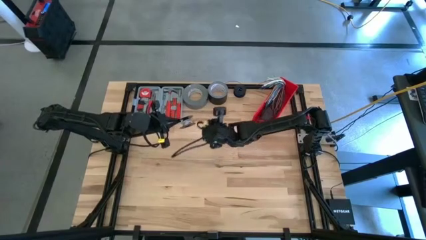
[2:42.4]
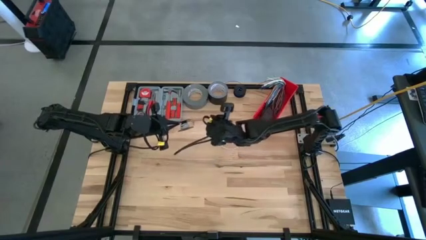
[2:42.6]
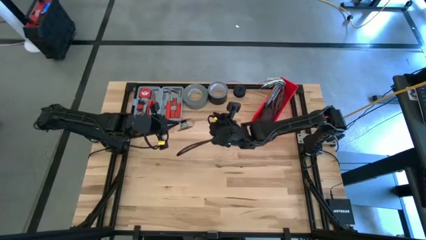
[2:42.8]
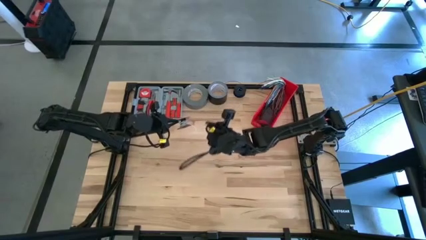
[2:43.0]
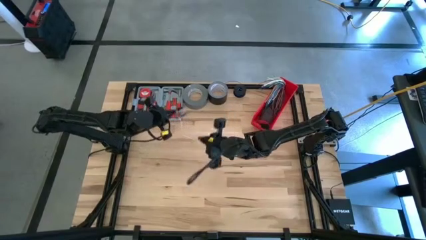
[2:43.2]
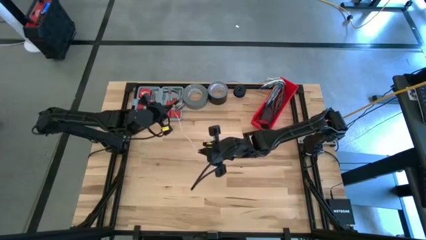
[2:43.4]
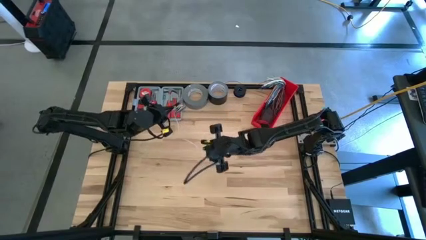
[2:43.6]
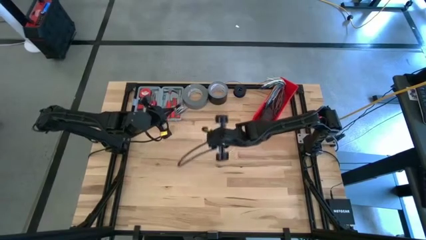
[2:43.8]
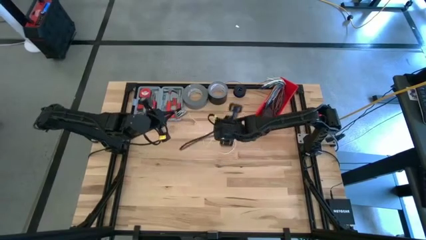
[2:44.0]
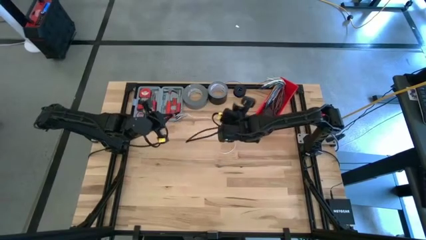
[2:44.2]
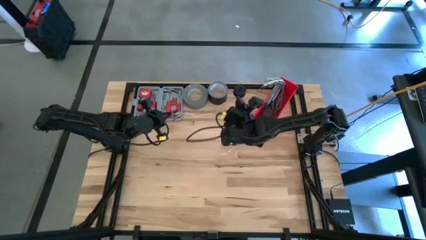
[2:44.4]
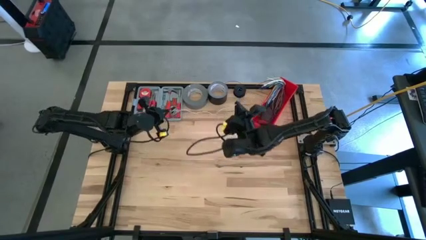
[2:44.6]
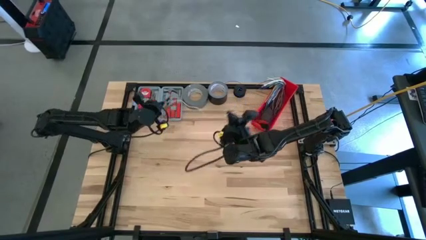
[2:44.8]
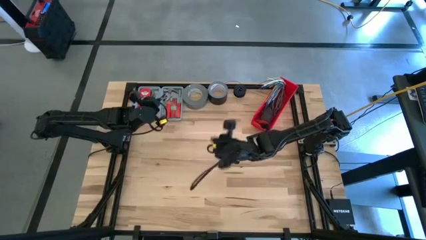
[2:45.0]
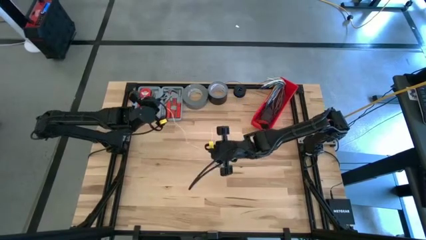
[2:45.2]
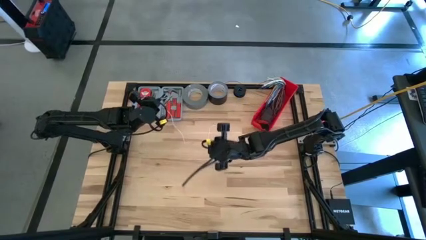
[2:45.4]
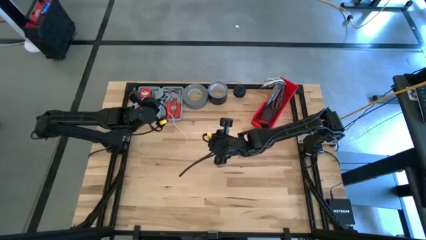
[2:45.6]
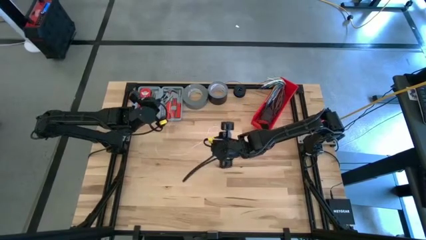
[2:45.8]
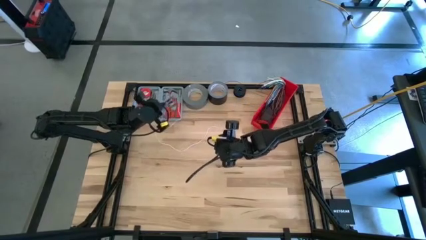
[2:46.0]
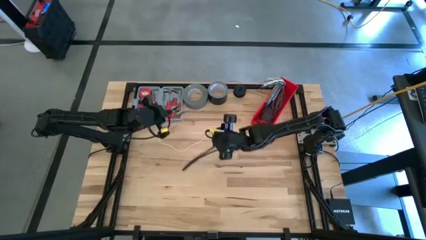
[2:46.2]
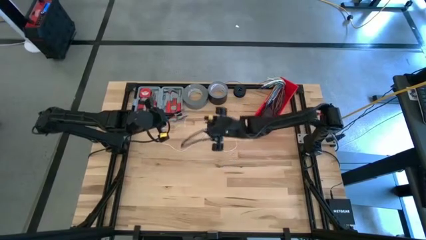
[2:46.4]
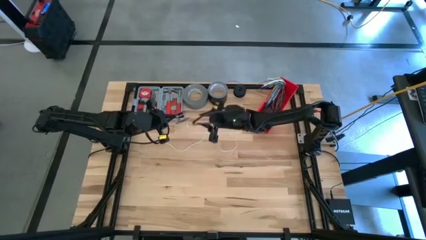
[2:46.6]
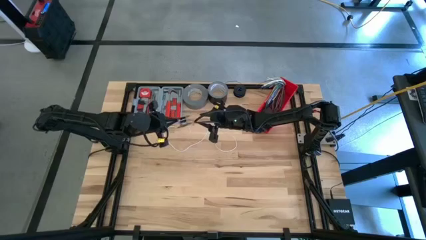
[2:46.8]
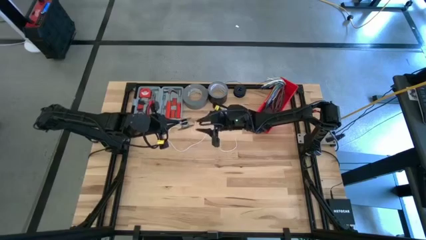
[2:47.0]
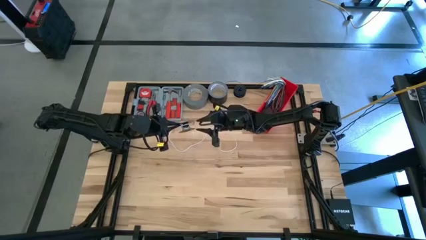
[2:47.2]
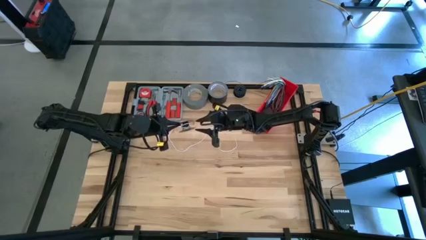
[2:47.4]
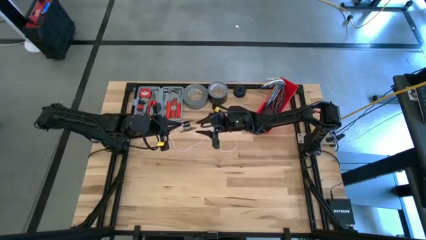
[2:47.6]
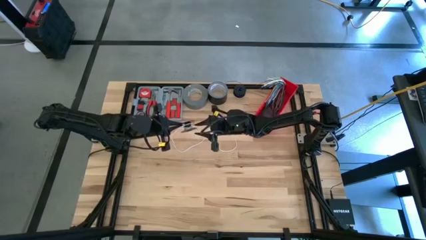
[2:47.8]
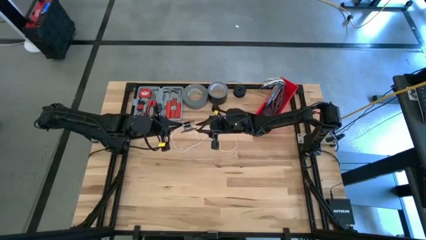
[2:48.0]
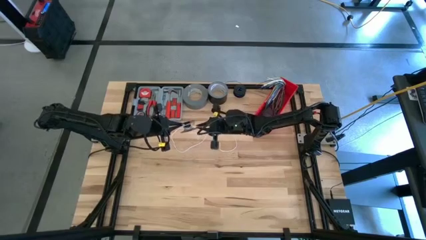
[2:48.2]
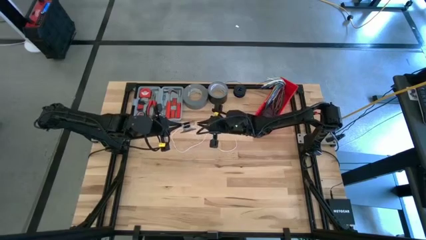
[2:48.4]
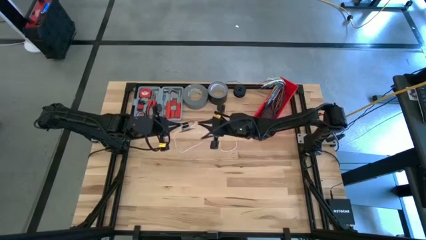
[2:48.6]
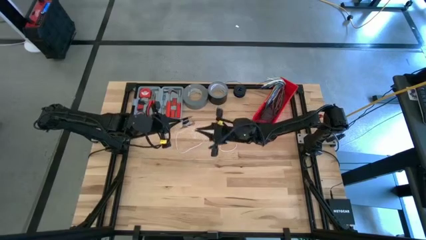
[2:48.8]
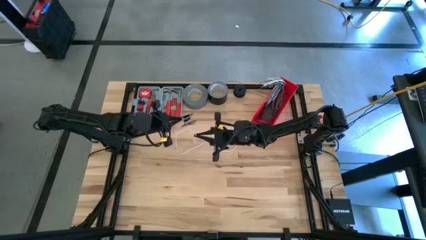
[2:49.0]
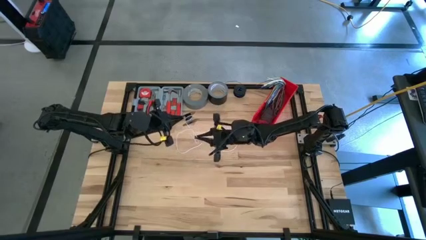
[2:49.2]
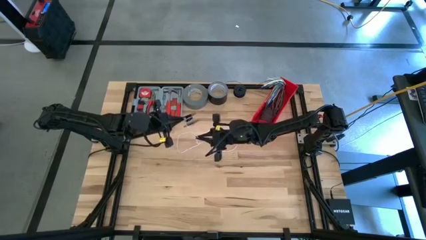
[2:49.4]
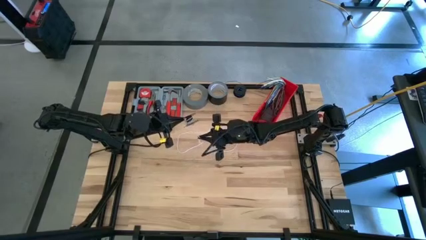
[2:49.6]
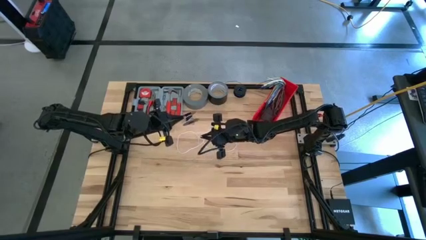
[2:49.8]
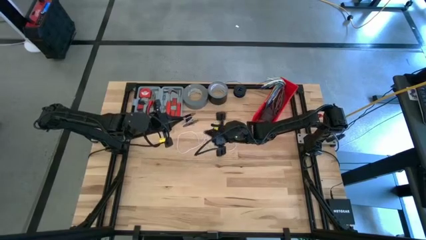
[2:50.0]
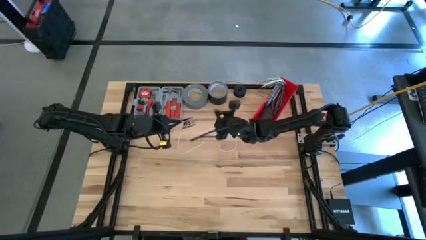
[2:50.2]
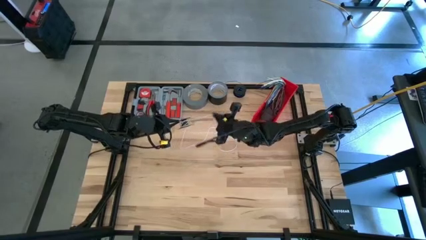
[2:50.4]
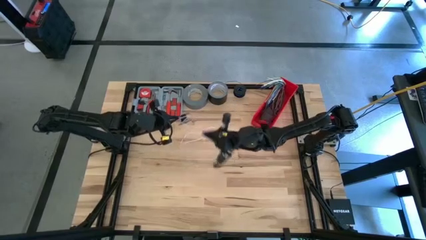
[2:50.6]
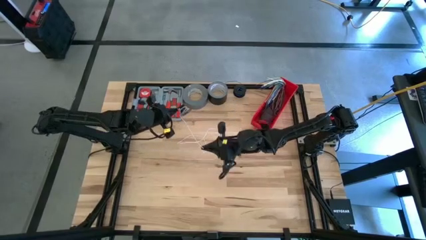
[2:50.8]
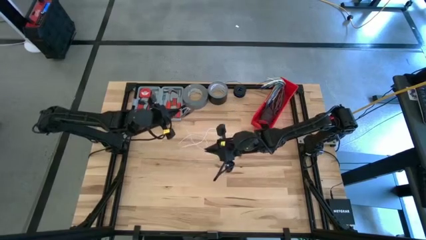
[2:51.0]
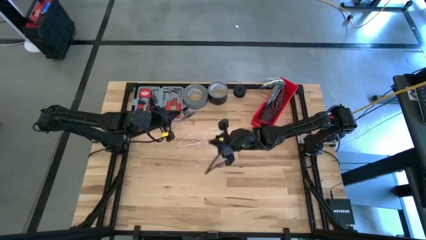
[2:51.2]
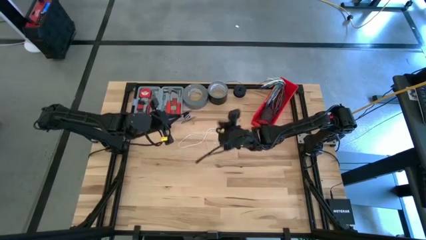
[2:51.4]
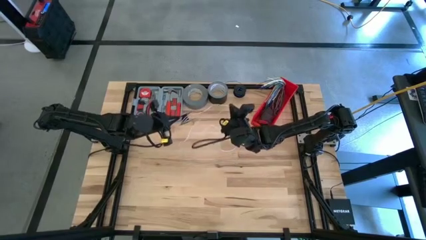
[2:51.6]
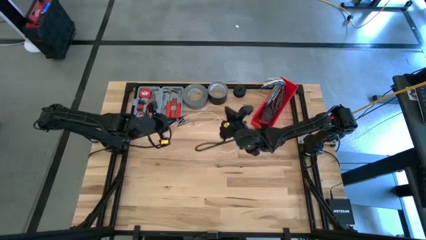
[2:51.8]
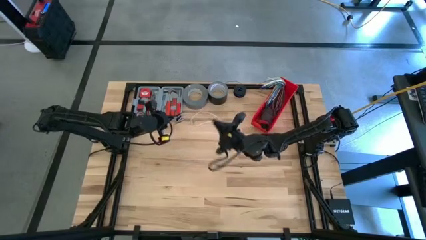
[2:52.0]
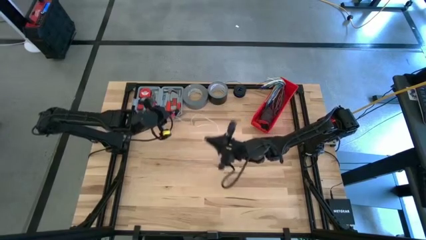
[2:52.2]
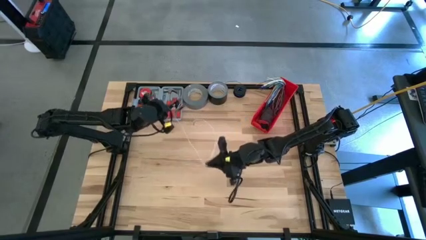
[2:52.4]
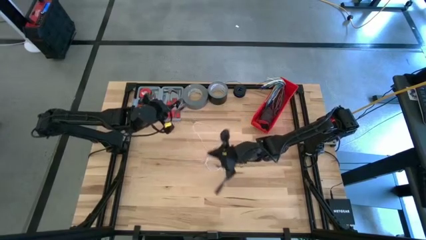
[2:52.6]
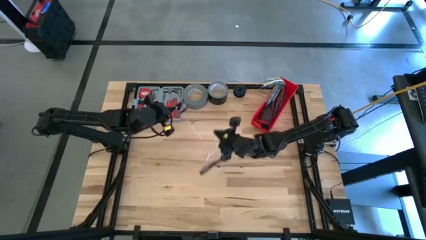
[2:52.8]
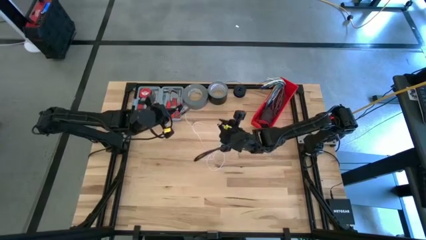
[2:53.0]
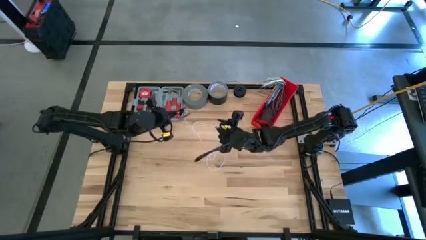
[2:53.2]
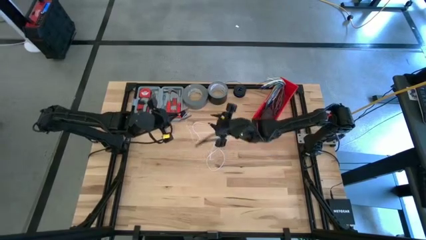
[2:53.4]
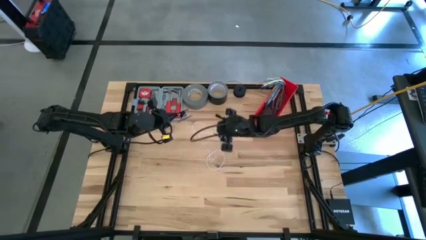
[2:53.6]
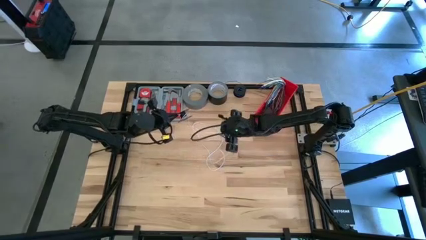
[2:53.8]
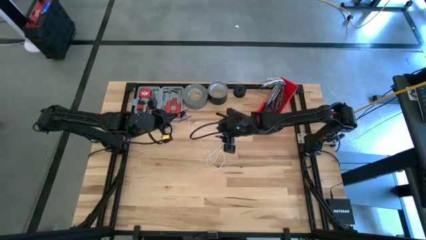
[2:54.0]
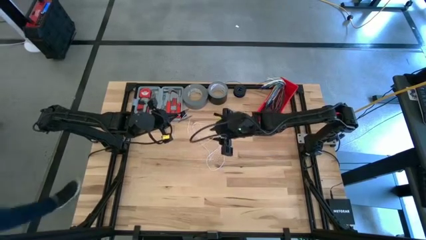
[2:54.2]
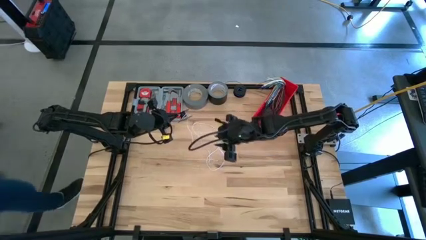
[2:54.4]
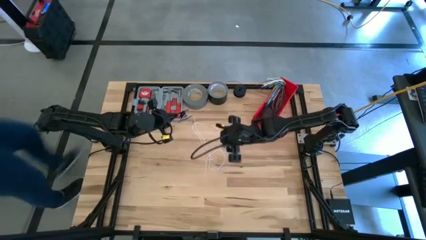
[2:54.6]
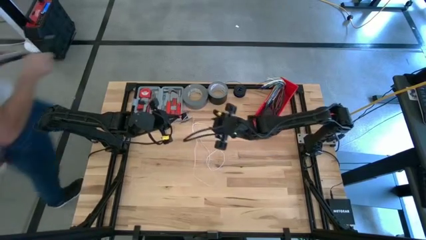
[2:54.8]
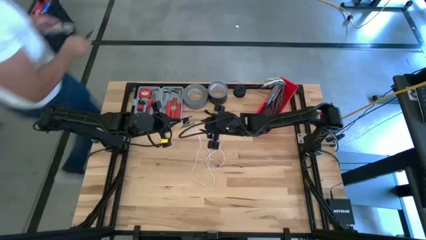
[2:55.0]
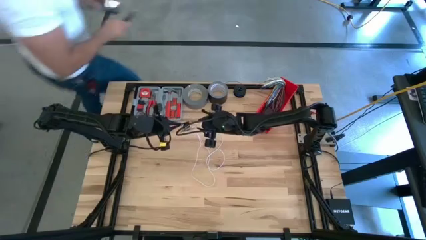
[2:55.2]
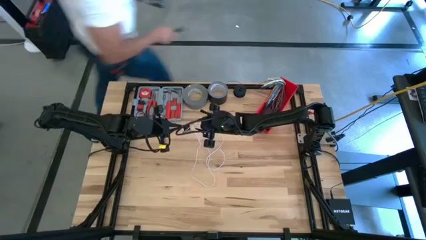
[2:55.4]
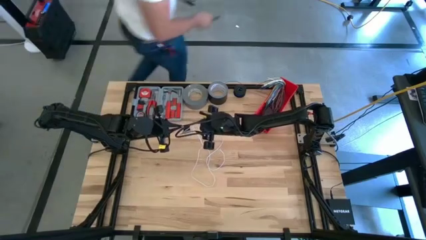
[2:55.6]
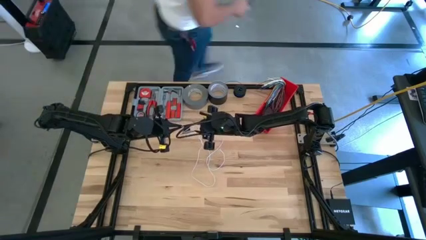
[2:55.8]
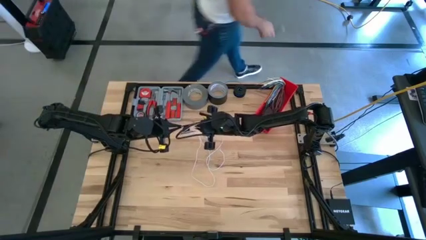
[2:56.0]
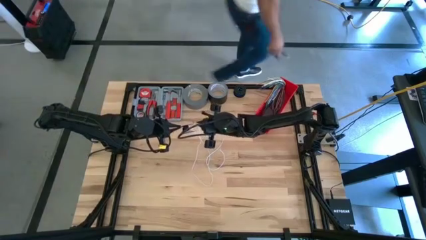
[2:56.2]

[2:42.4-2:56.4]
Task: Coil cords
Uncoil the white wire from the black spool
